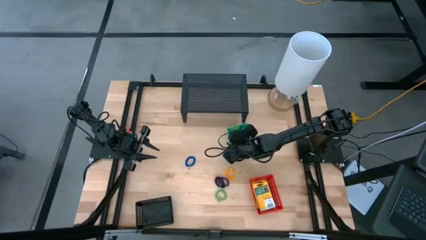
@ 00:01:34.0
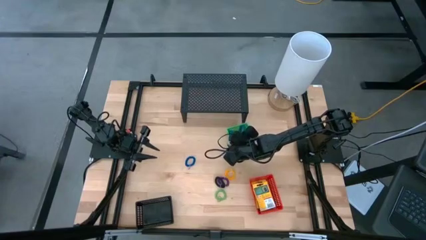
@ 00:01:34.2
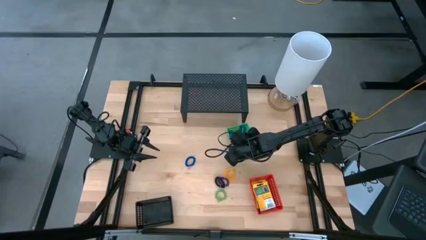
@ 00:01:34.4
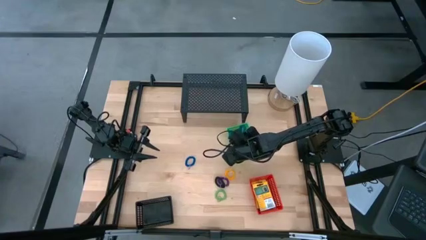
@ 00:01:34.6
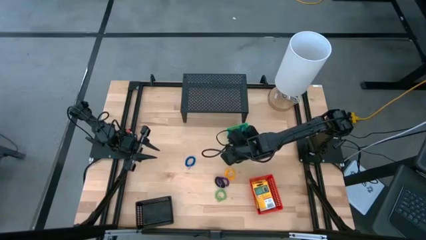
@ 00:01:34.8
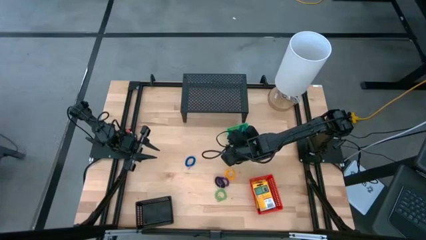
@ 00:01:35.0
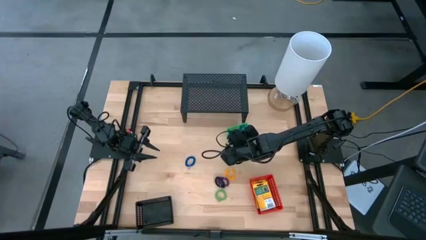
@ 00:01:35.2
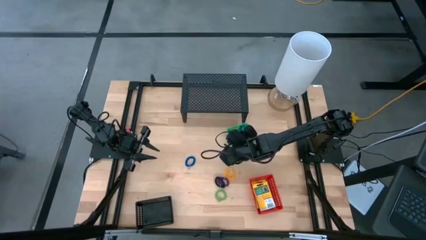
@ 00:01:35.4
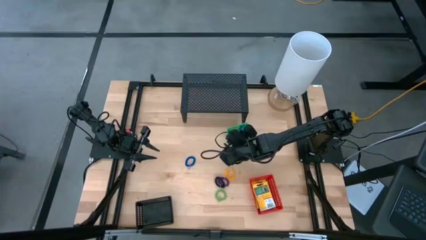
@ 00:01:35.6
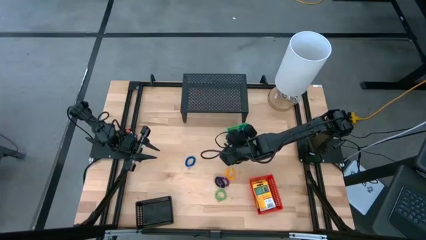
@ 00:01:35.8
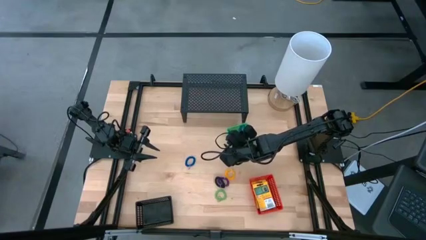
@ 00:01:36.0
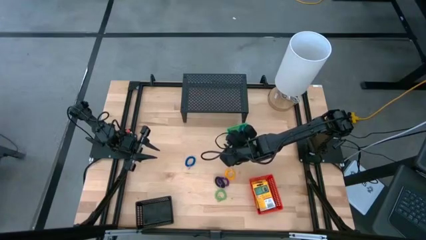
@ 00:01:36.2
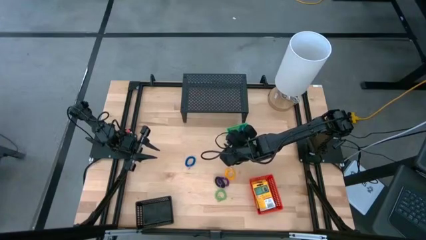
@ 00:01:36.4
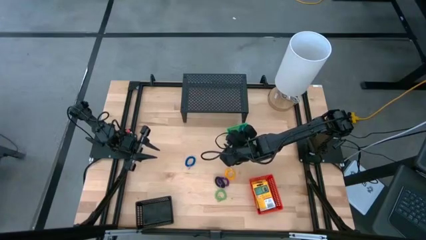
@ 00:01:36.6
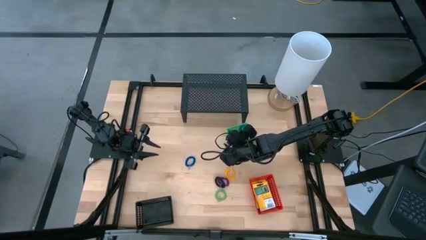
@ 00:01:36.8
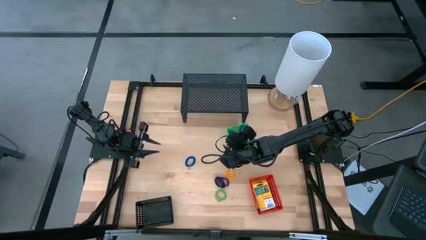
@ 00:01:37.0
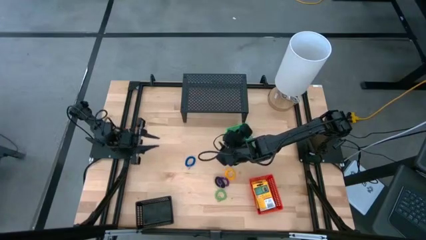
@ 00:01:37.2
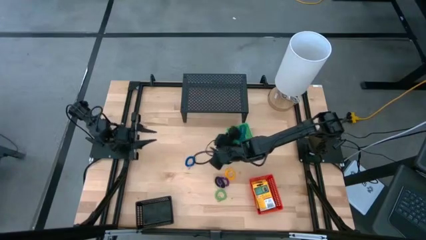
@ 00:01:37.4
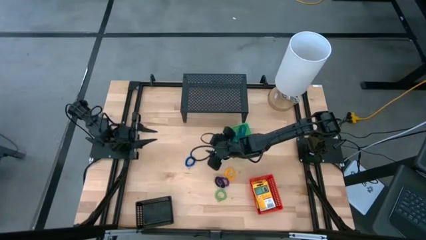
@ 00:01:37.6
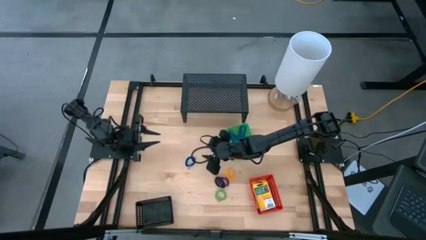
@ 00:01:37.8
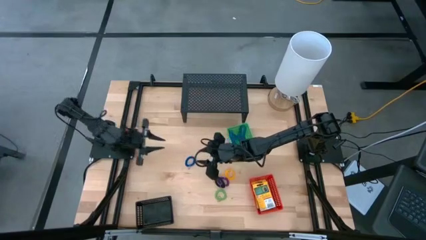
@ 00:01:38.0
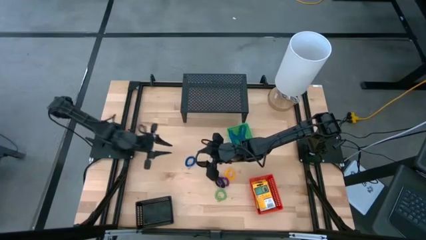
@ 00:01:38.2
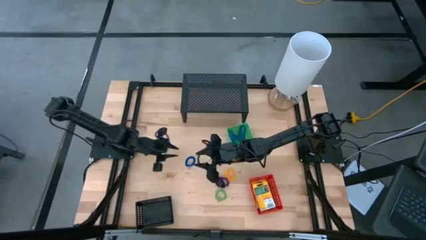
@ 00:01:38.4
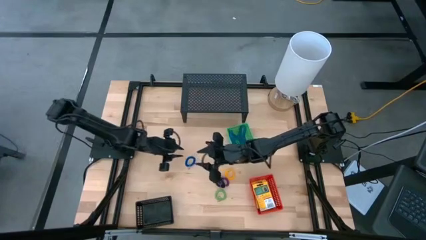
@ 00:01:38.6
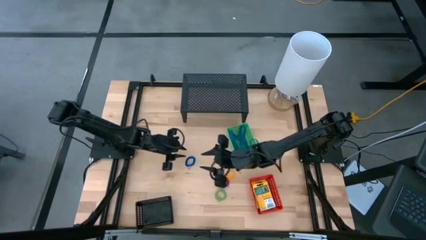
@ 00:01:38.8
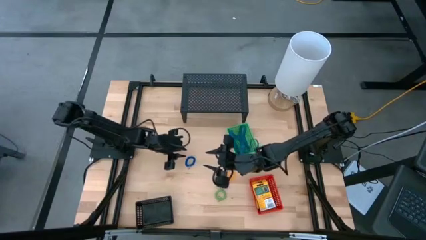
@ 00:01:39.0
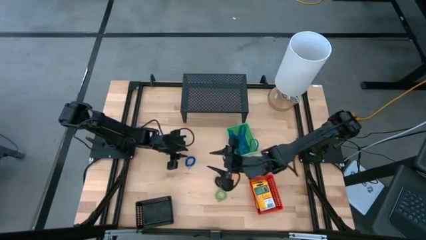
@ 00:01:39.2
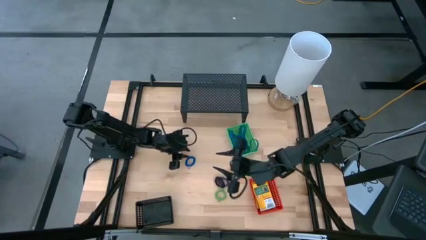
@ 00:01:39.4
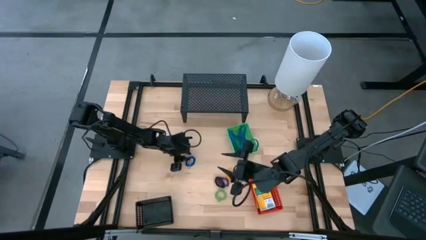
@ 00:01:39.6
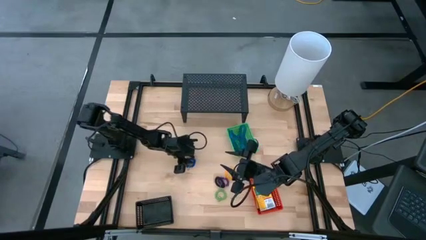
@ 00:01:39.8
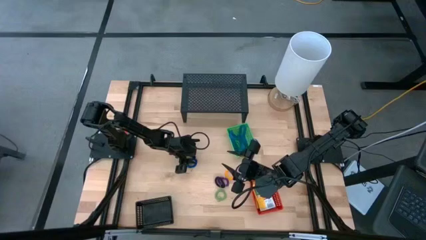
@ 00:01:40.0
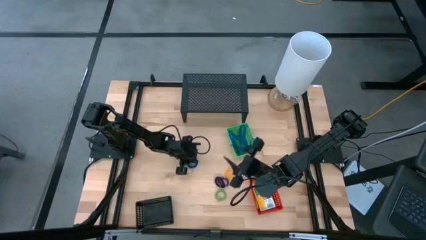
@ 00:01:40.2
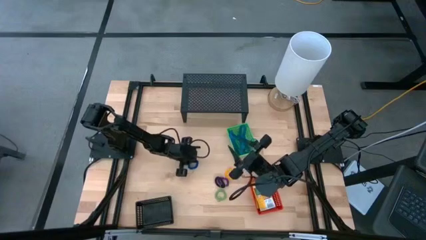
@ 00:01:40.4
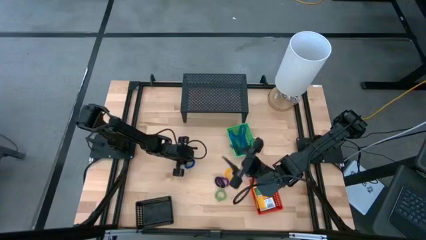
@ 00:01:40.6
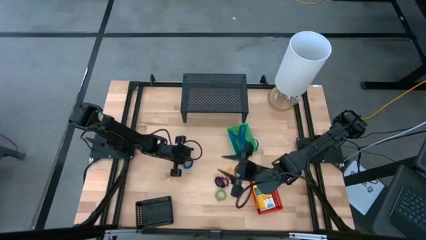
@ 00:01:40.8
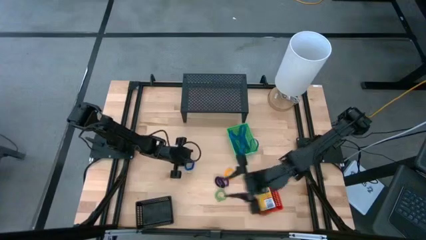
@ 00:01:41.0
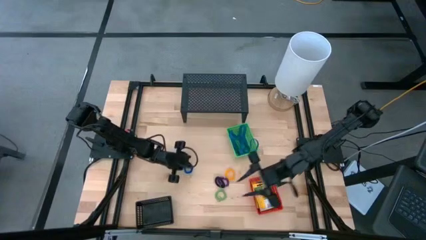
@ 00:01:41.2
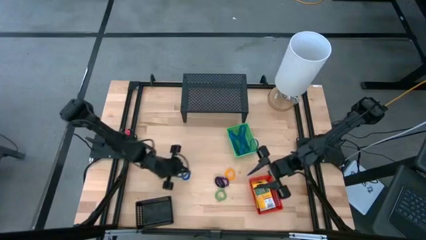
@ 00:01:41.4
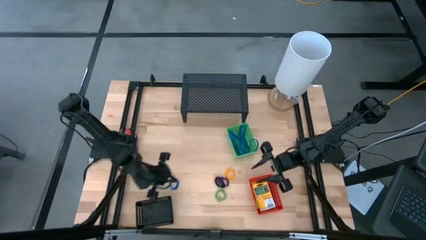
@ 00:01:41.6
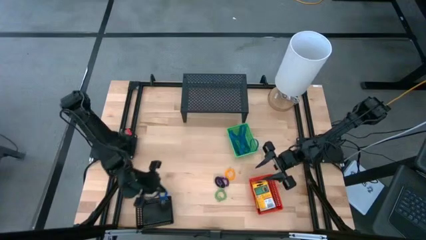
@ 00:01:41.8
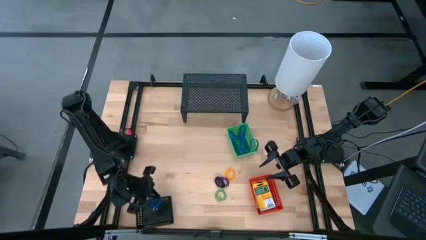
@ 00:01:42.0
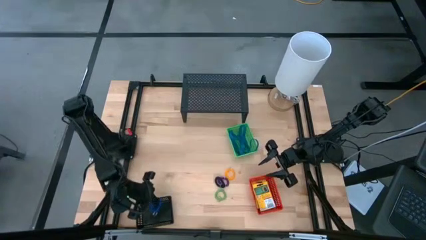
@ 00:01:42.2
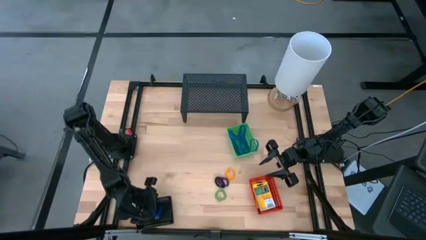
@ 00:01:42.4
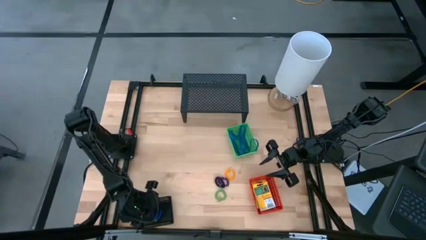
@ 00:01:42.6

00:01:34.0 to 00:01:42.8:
Task: Pick & Place Office Desk Supplies
Put the blue spring keychain into the black basket

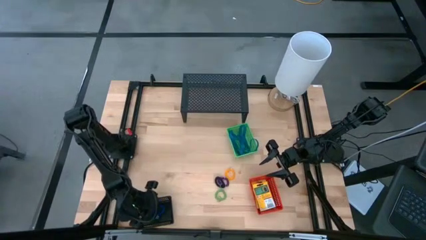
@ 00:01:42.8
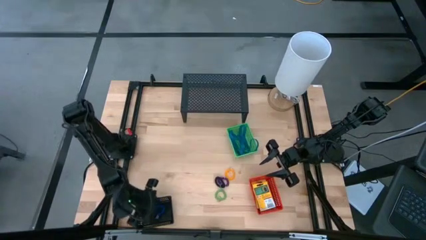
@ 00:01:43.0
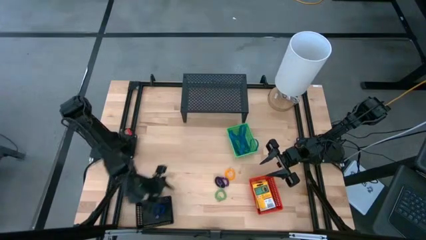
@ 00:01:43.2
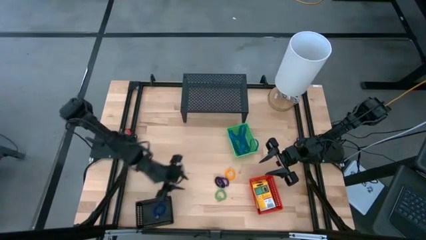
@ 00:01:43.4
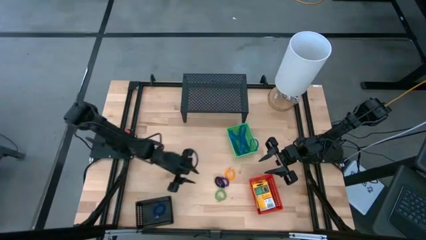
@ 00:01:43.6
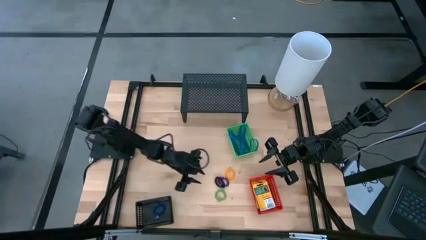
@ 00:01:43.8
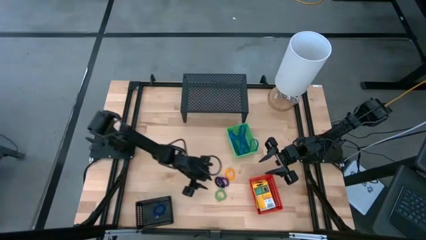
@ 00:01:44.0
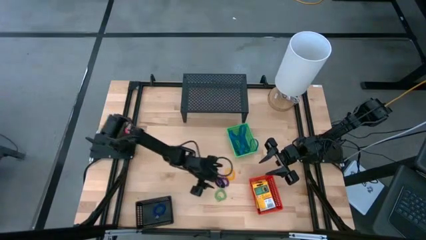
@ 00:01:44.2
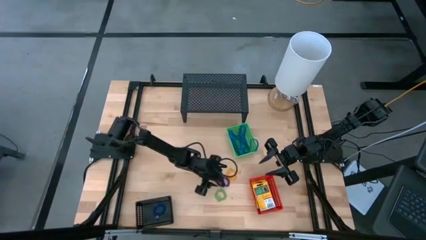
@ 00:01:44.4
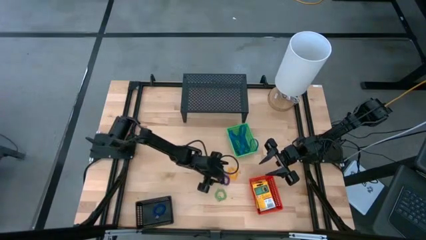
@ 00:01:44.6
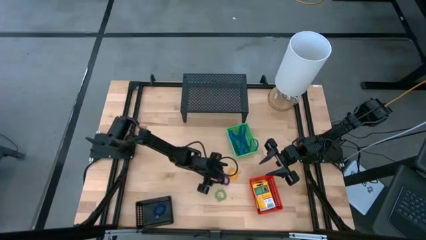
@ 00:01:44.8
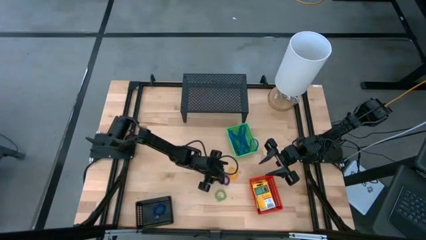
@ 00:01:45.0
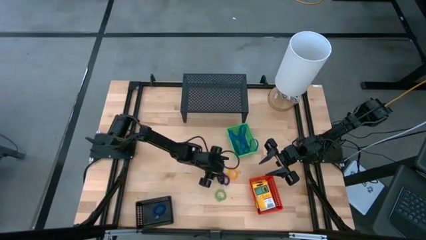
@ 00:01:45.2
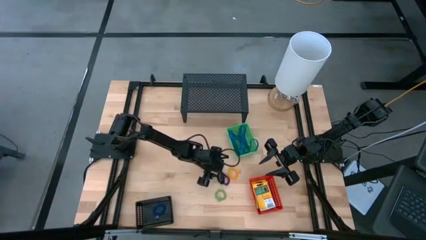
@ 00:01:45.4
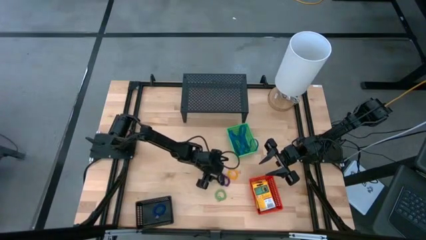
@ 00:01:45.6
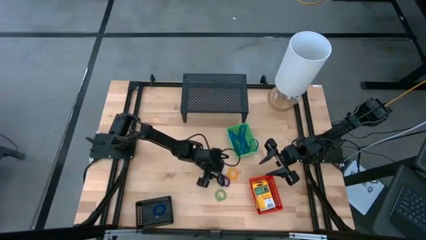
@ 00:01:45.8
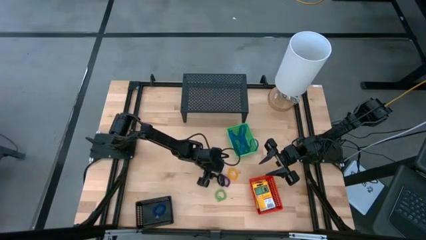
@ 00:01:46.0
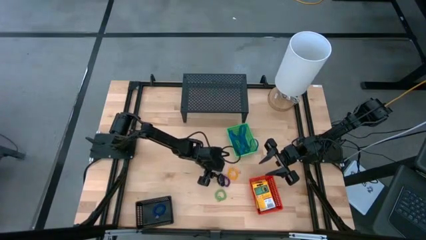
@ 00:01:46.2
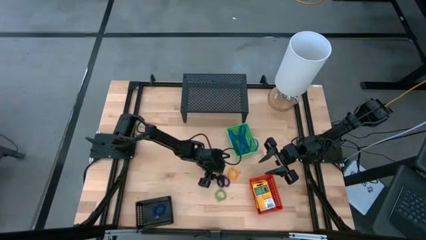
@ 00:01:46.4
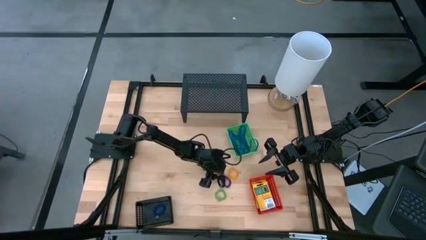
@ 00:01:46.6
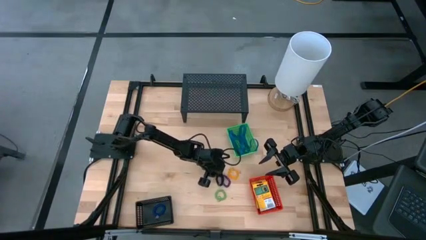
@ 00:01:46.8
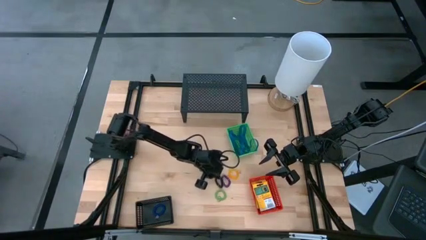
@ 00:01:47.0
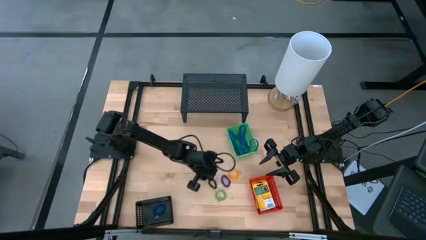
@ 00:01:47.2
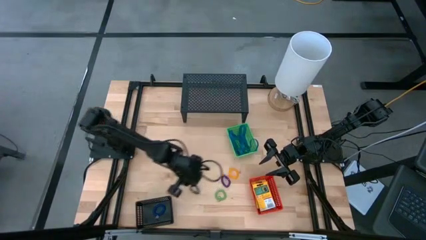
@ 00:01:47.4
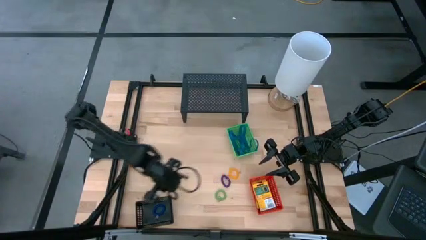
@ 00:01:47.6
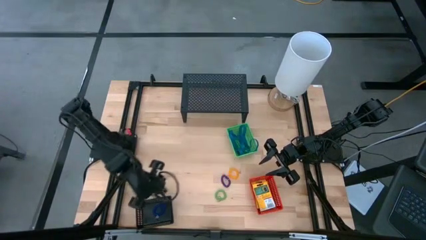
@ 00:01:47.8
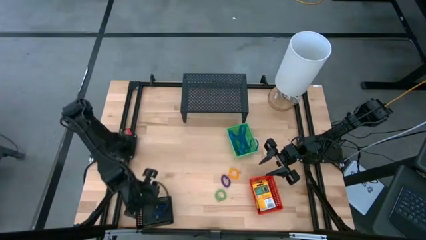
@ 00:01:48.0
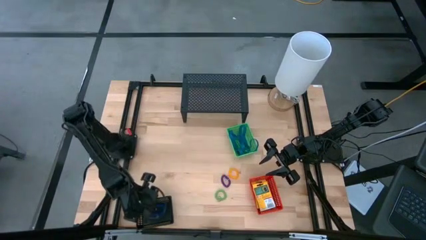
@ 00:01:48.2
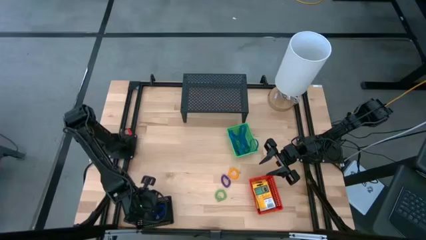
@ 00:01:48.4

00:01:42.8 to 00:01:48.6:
Put the black spring keychain into the black basket

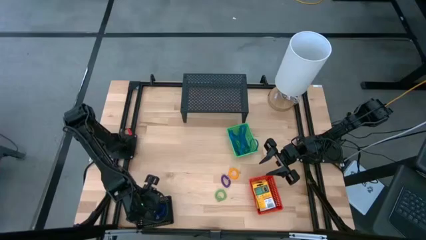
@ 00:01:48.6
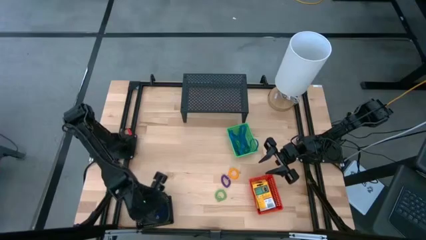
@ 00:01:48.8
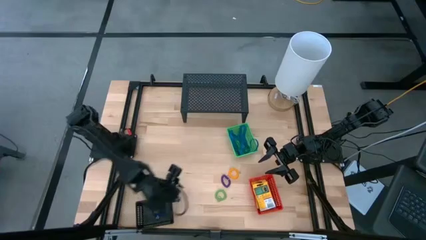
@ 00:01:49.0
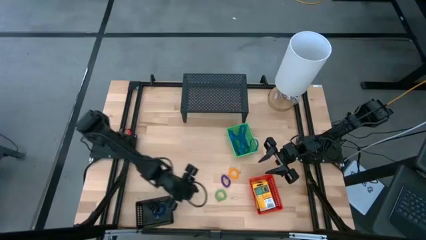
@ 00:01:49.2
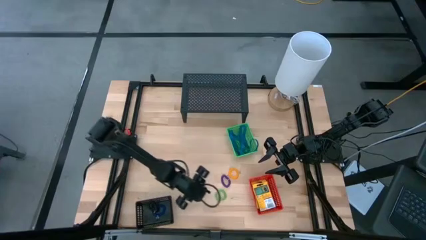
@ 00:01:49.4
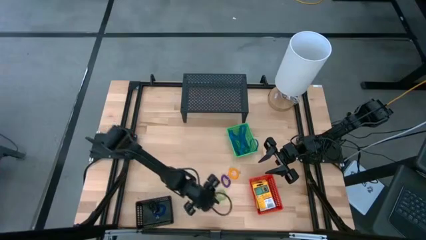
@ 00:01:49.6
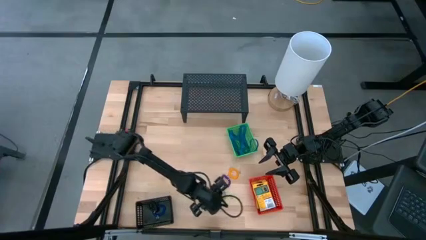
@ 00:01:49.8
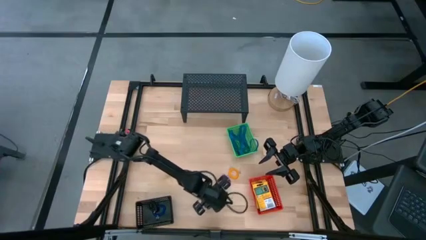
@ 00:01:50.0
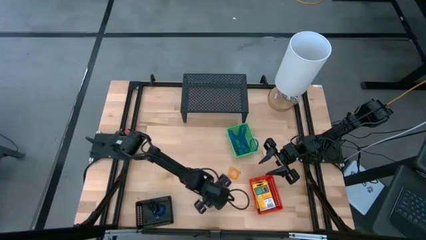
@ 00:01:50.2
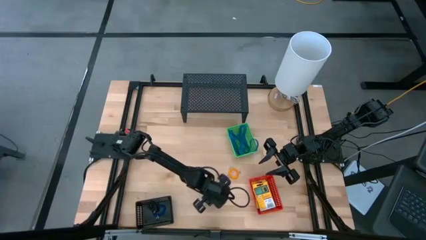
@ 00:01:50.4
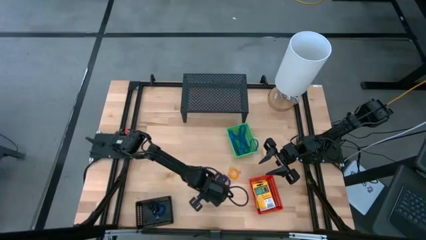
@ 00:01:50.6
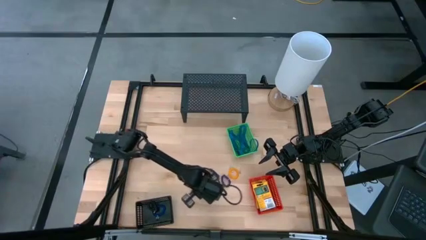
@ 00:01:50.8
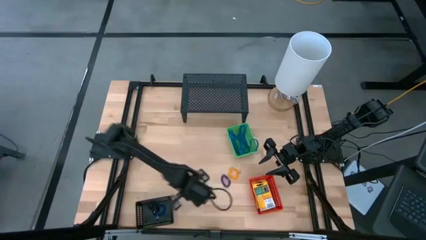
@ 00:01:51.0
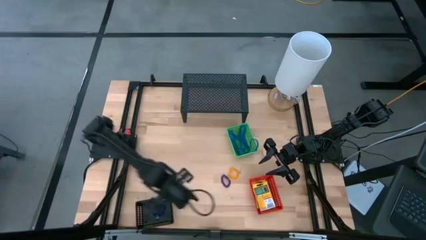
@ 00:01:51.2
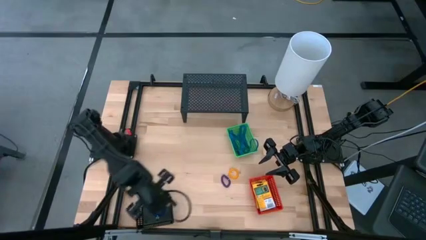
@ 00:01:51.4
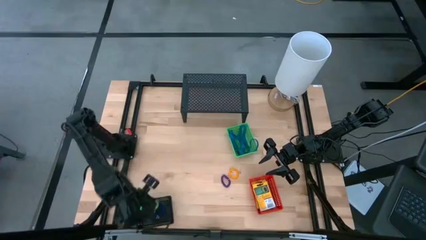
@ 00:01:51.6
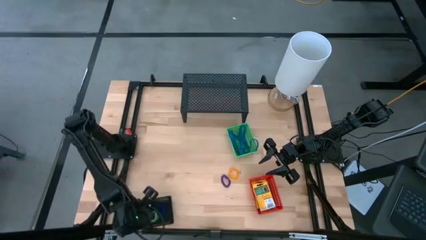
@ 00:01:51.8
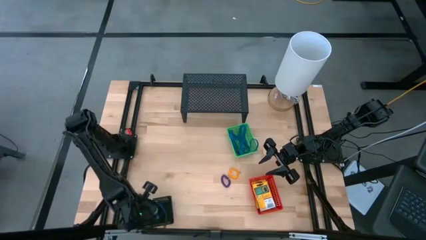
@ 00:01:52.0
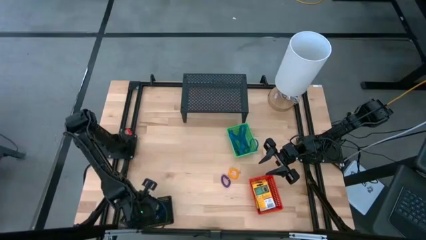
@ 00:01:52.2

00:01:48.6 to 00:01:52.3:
Put the green spring keychain into the black basket
